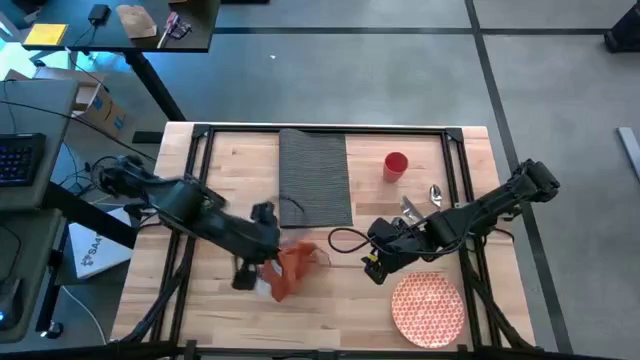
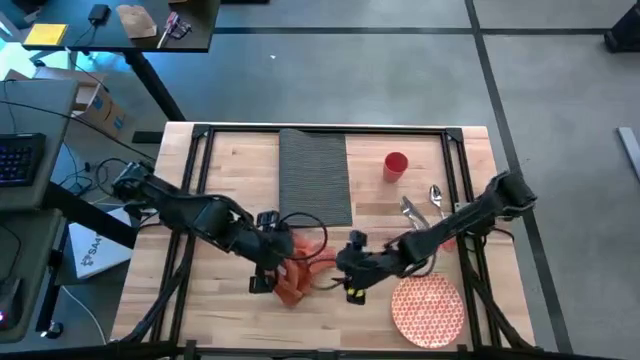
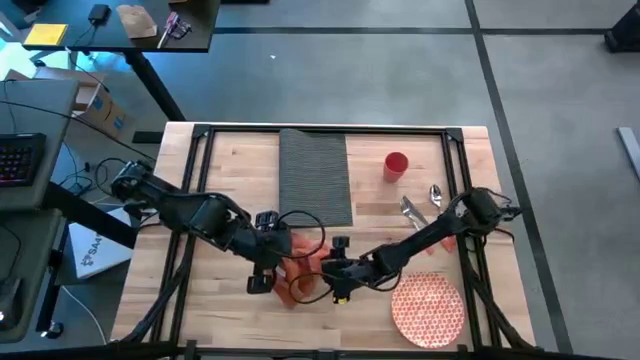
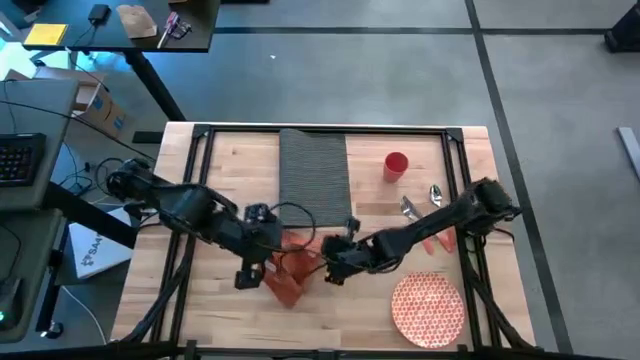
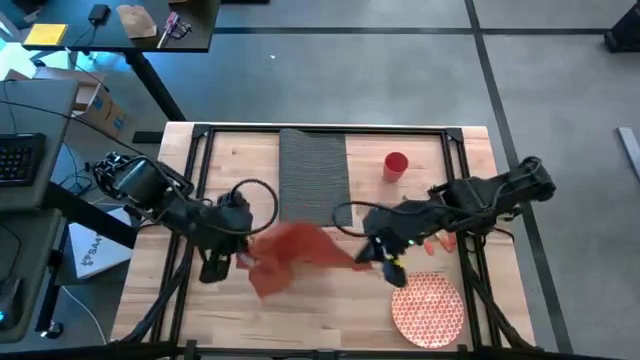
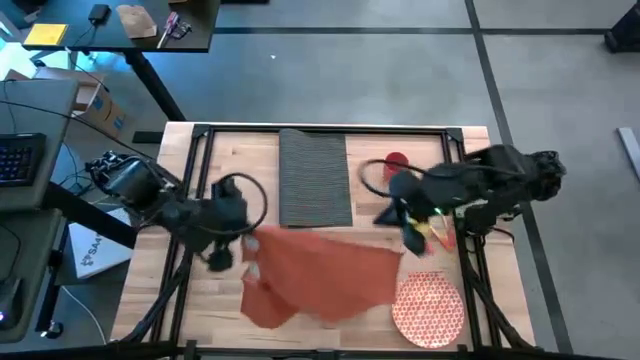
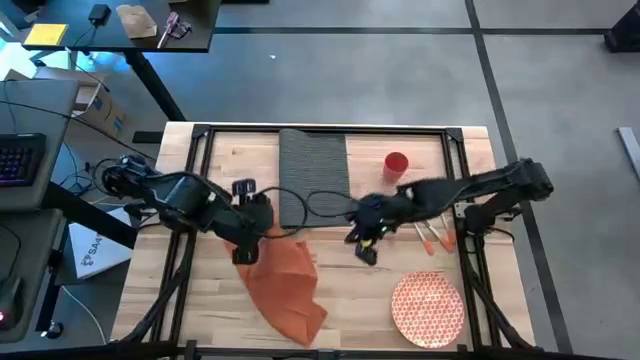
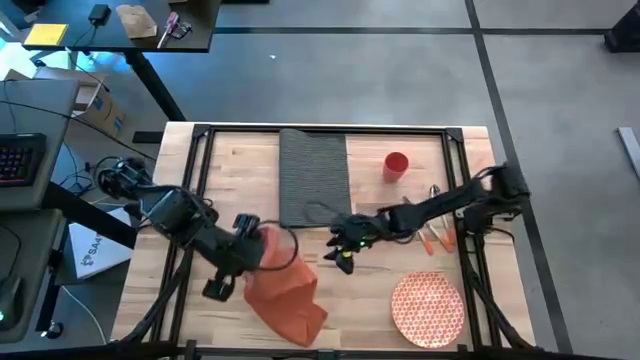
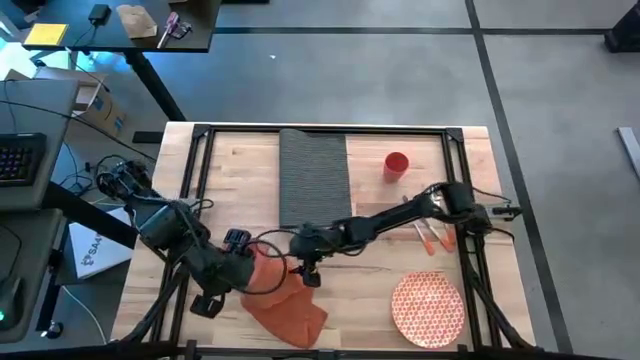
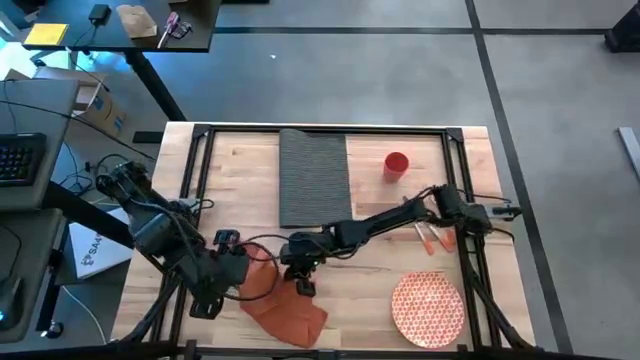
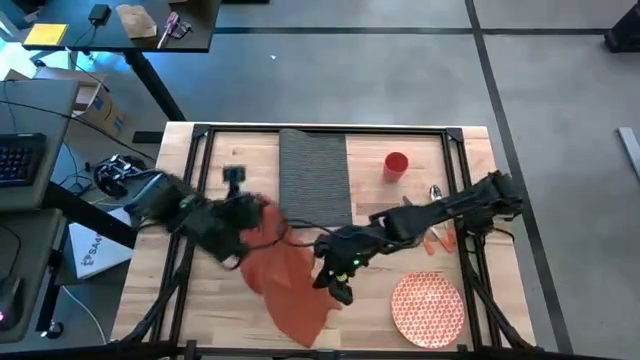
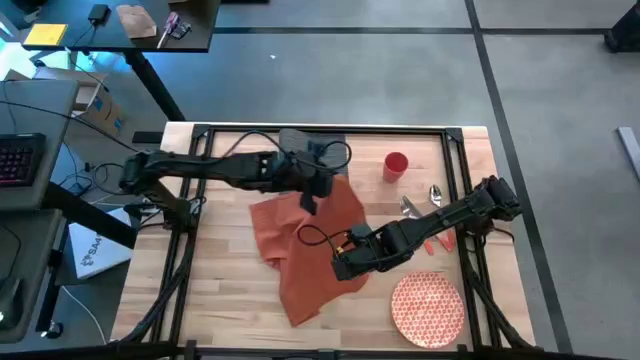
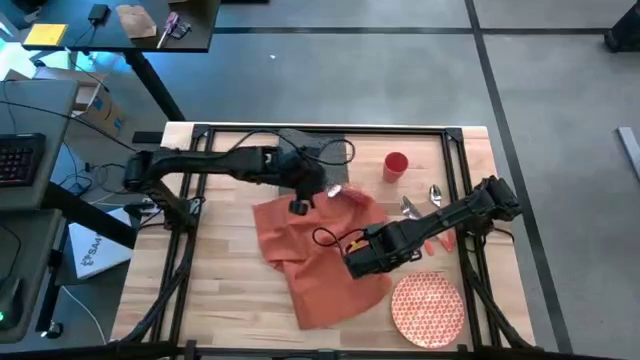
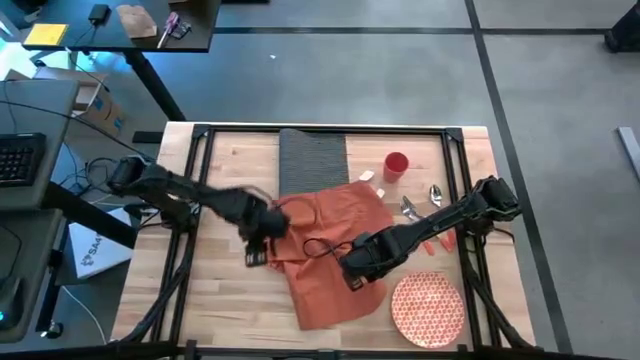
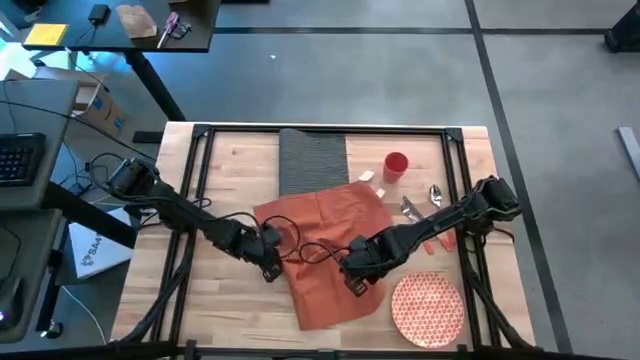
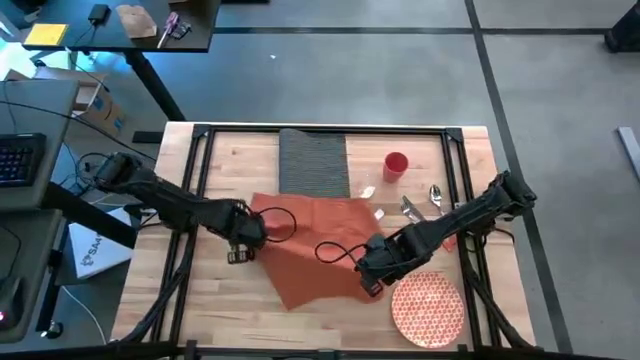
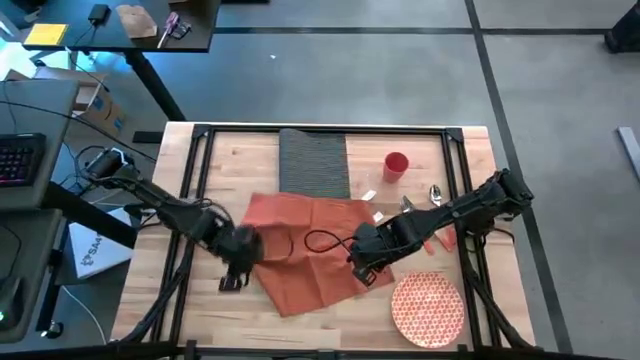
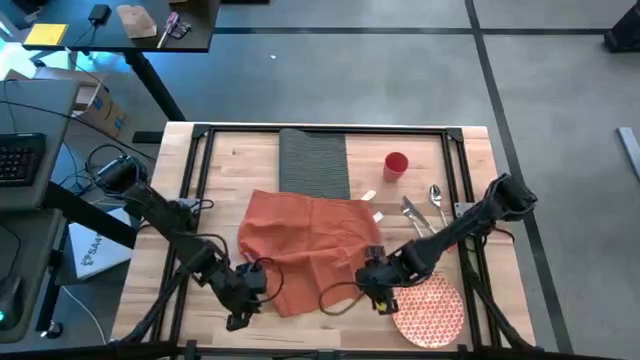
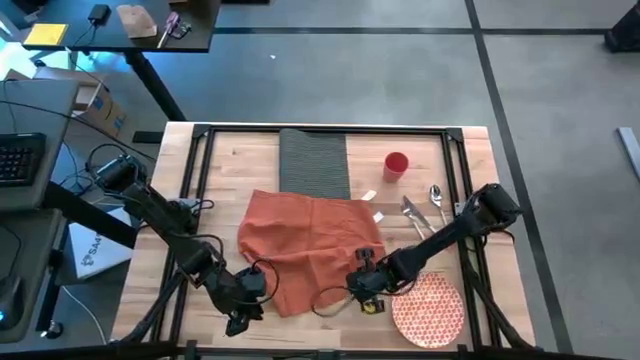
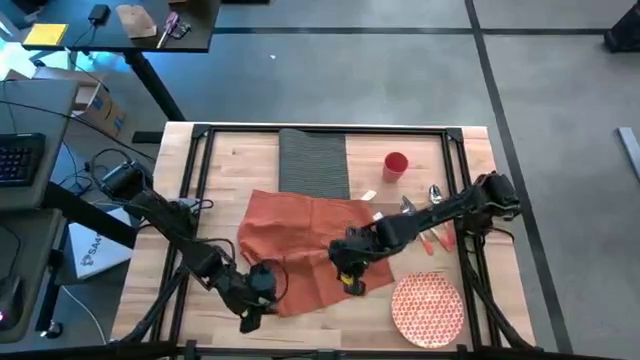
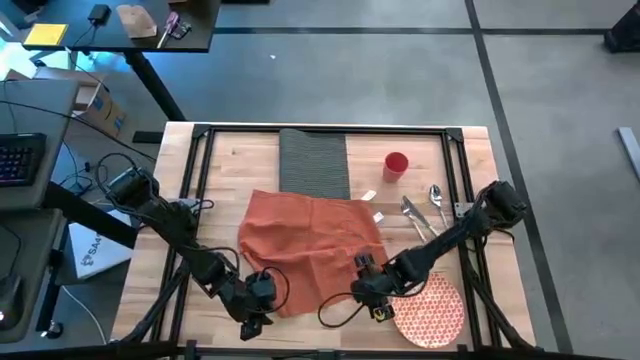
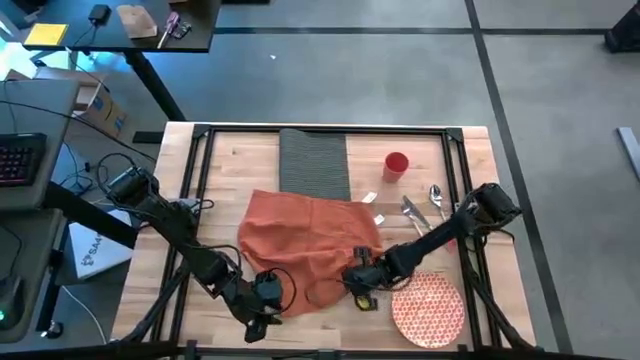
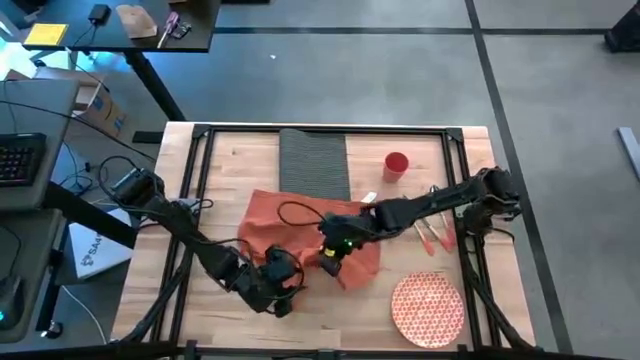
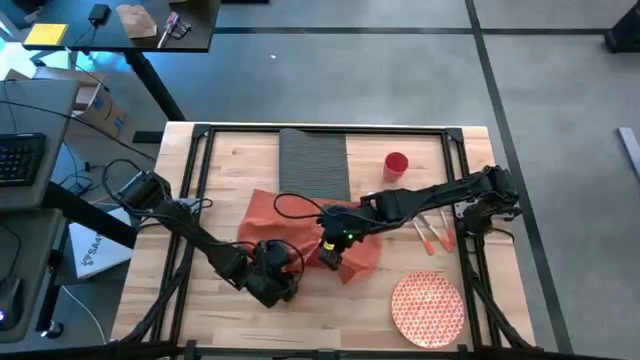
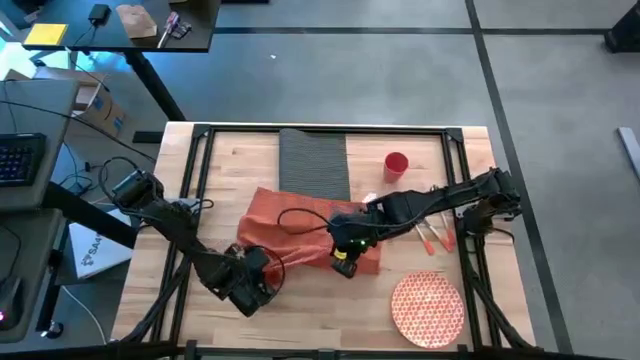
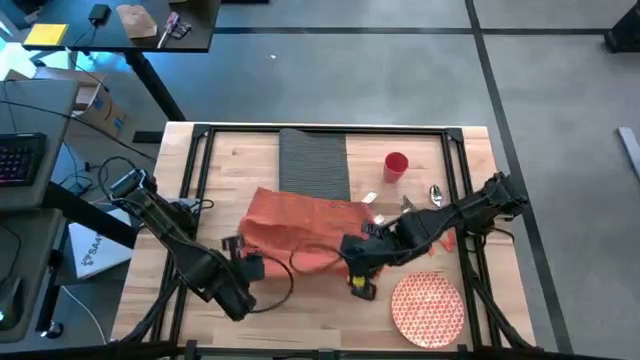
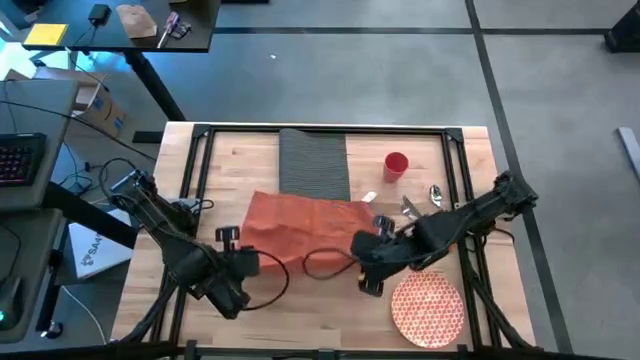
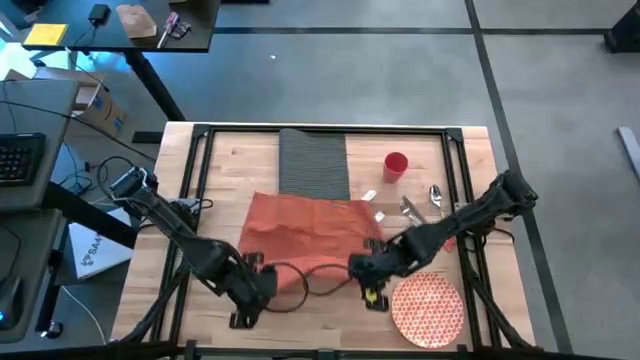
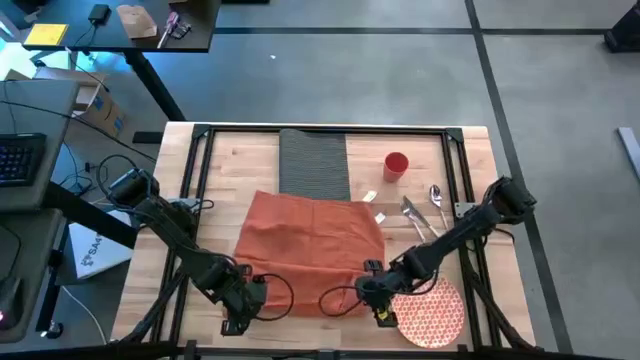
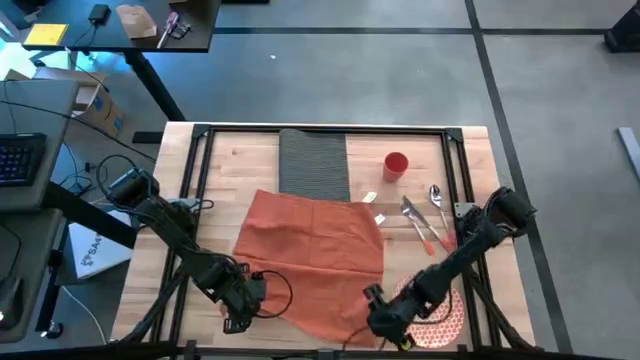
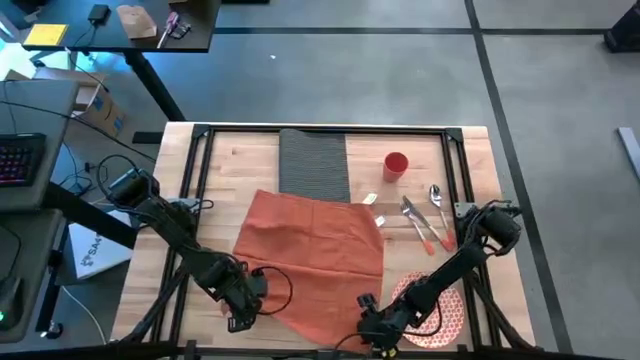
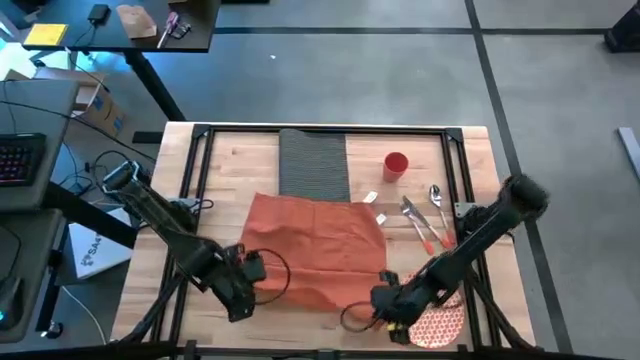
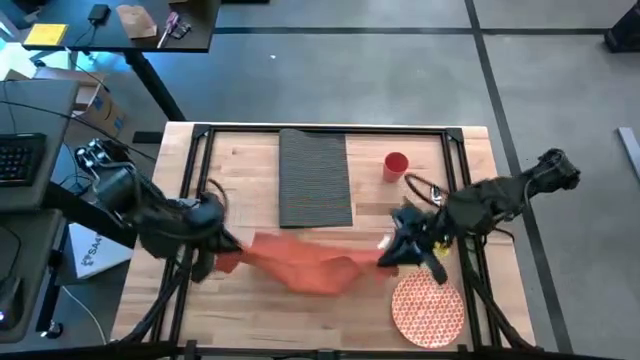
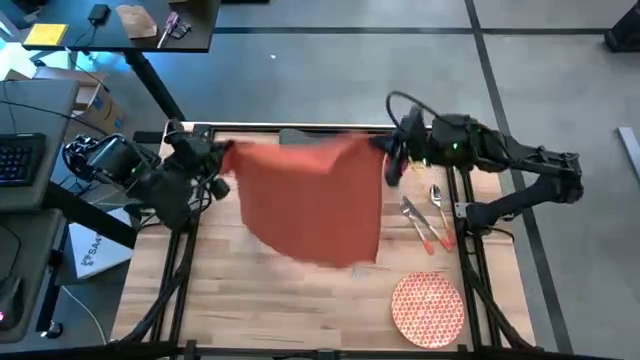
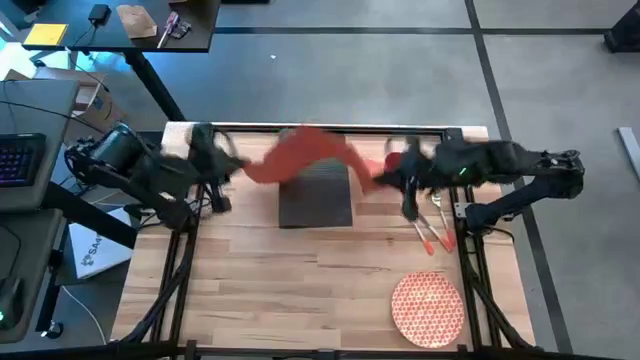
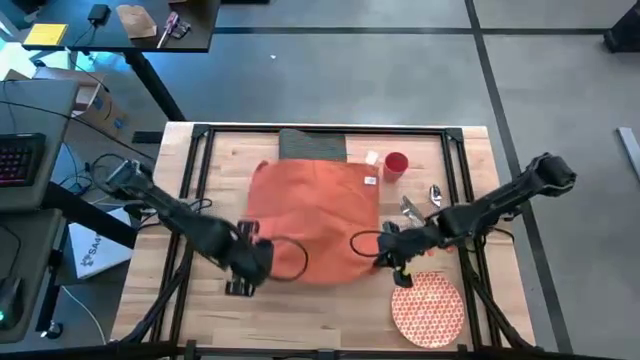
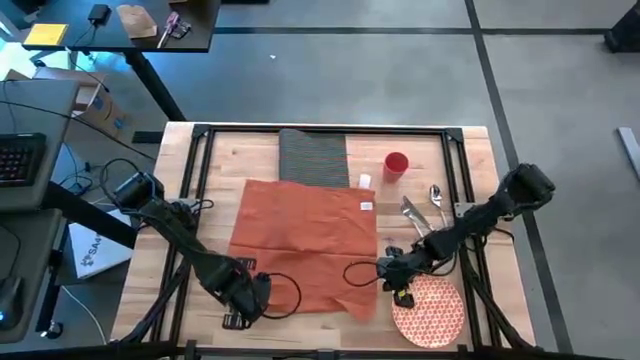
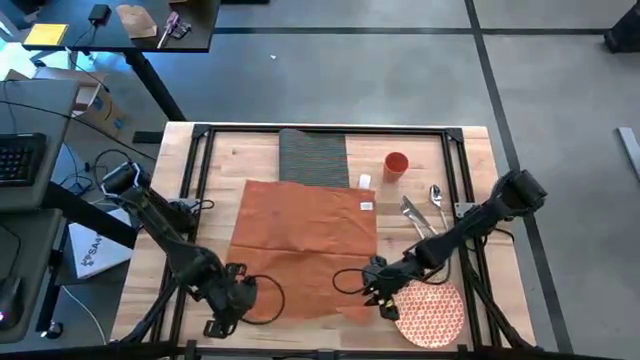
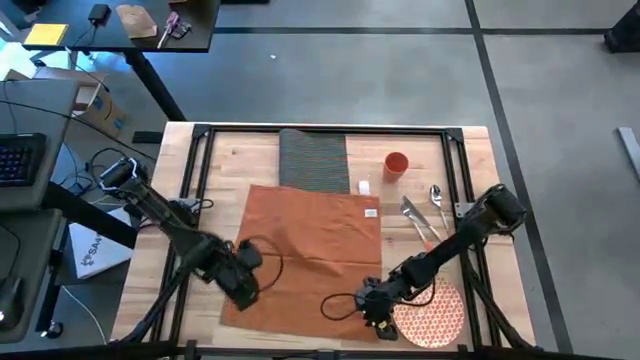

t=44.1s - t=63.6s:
Task: Set table place
Move the orange napkin to the center of the table

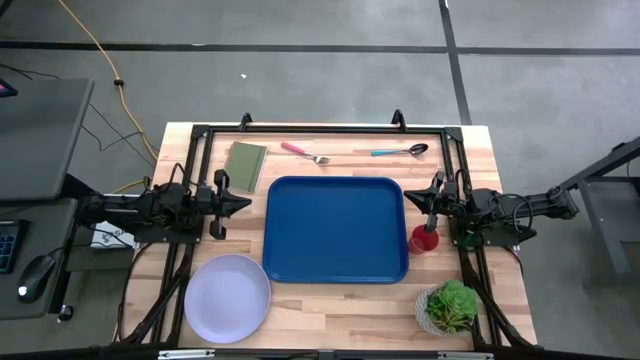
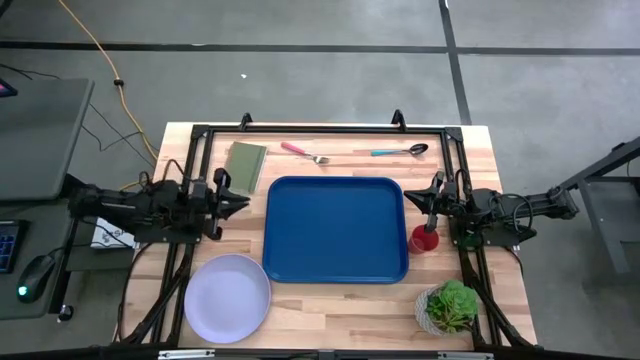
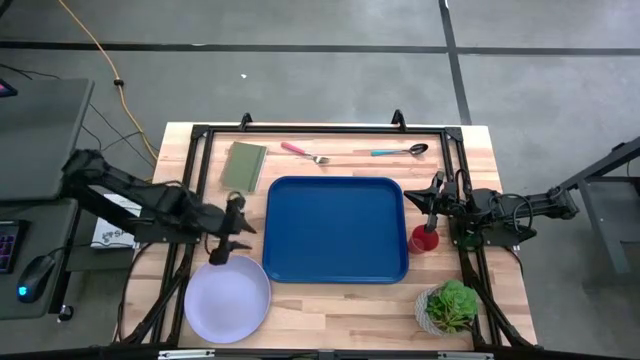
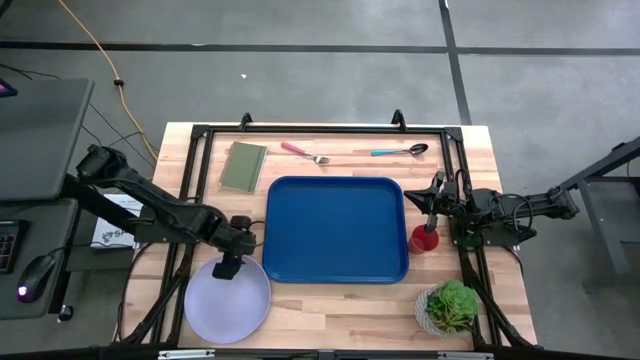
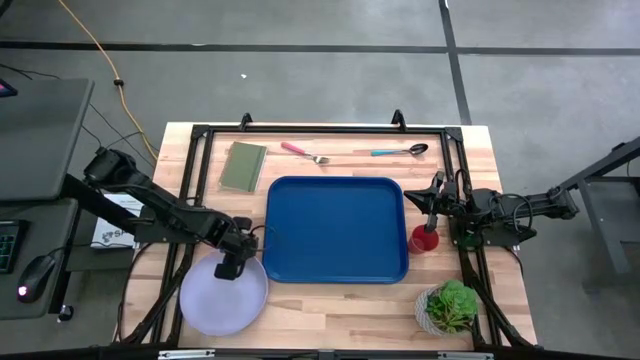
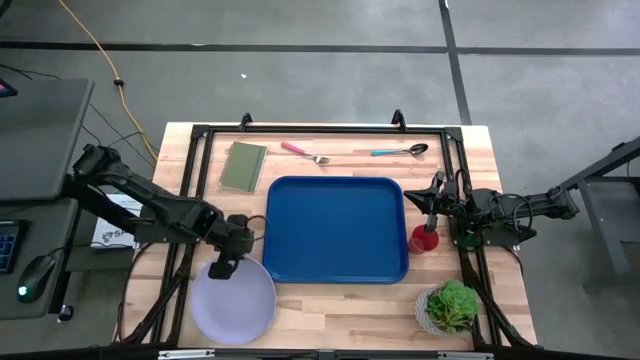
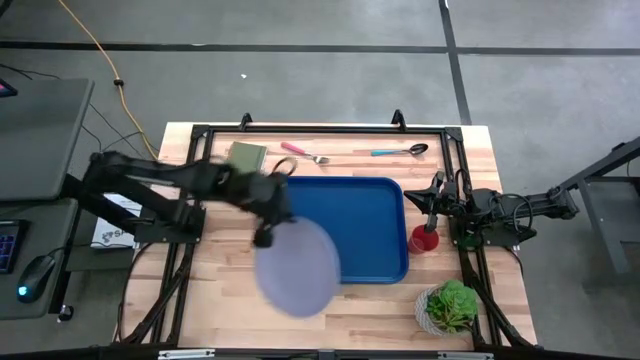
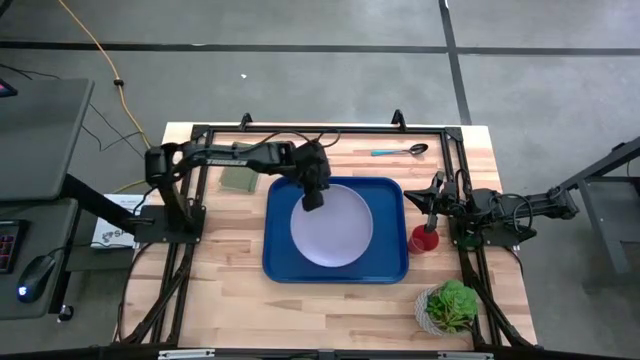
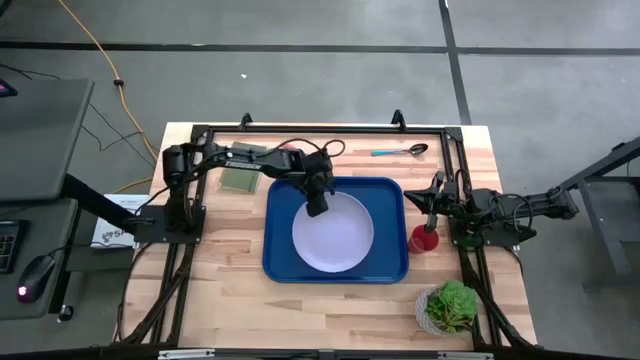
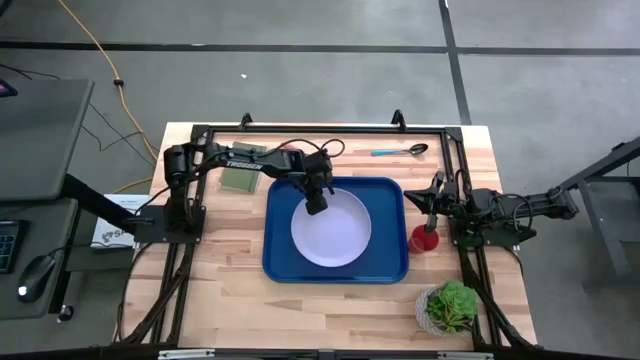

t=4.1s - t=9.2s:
Task: Pick and place plate/cup/fork/spoon on tray
Put the purple plate on the blue serving tray
